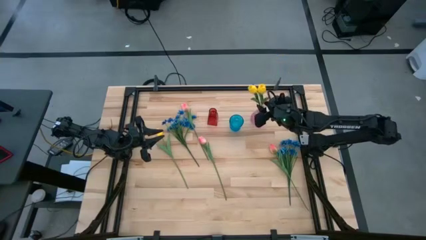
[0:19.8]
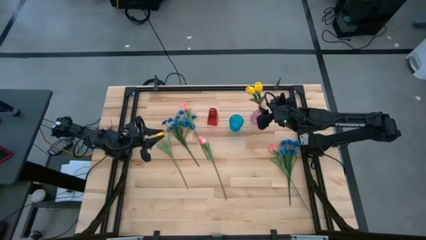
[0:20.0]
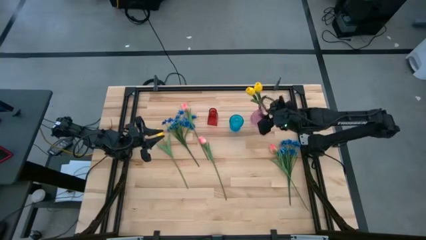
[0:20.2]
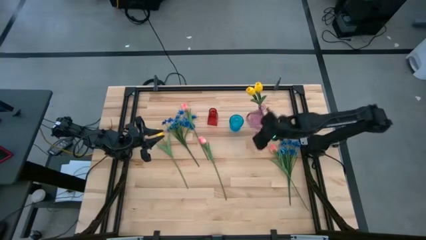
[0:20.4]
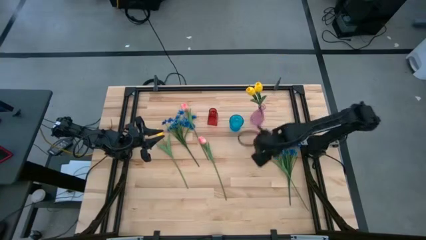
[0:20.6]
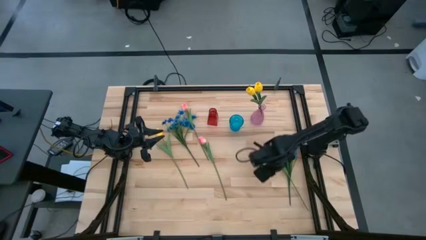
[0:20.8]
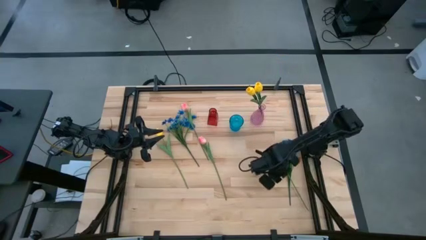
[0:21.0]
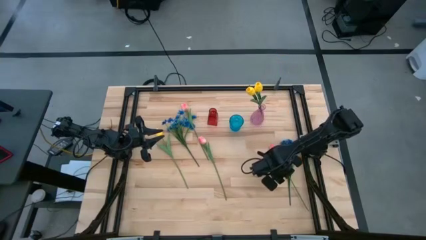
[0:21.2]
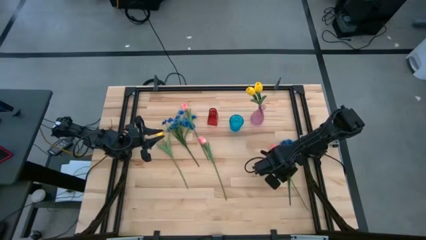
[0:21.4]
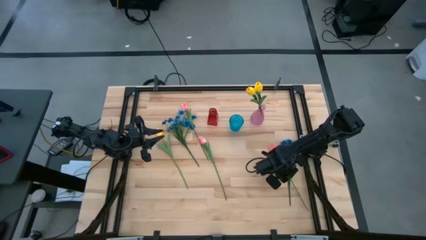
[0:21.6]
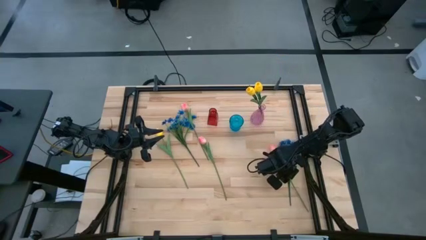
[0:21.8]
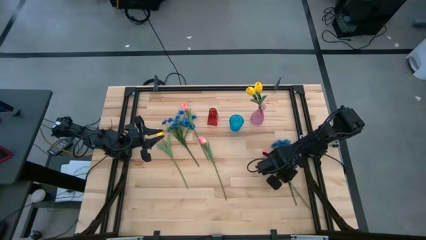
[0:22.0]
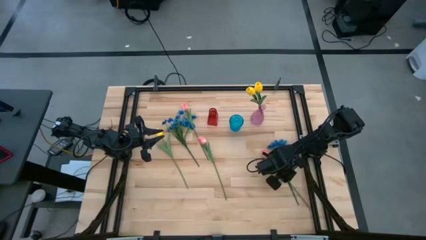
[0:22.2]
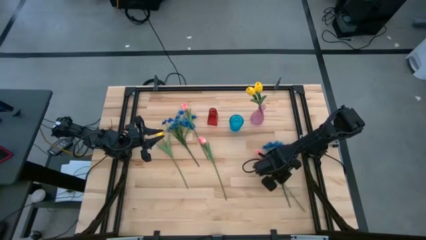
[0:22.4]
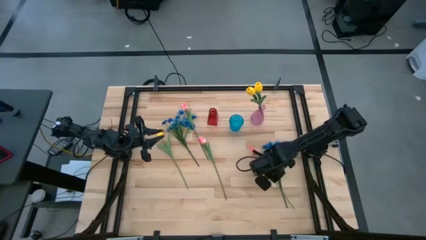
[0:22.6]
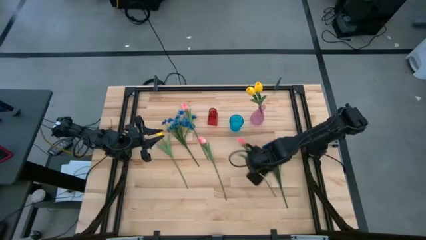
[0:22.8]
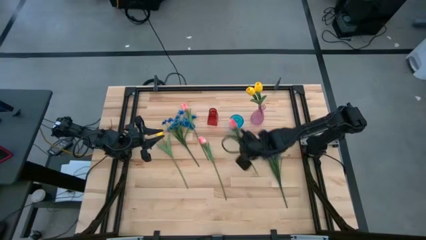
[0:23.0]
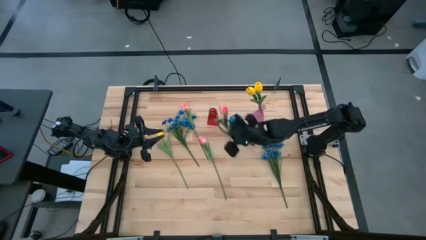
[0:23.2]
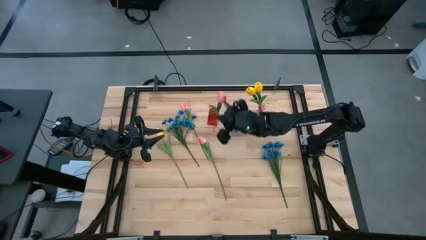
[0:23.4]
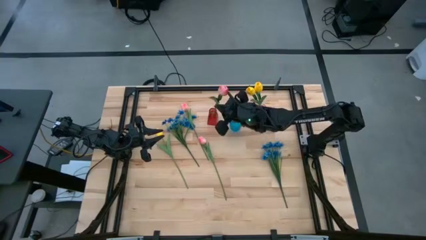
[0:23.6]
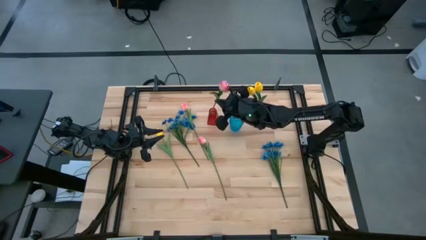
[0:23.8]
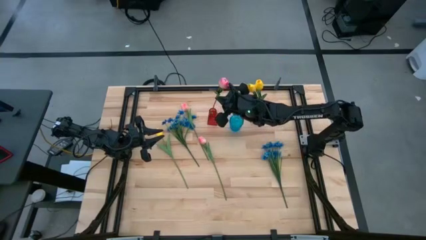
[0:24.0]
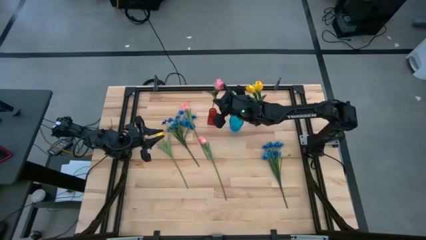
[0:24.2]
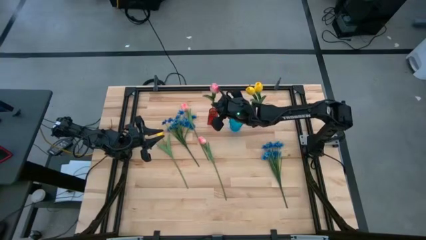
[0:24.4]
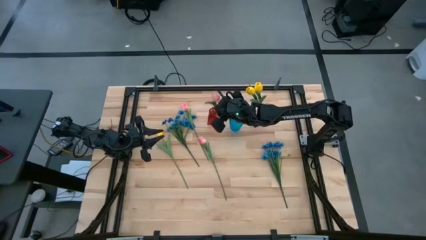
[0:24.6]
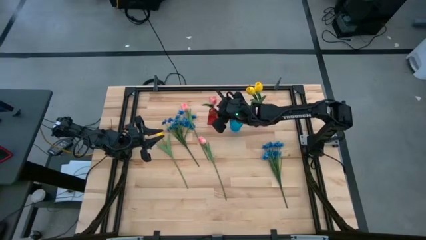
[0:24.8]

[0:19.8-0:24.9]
Task: Sort flowers into vase by color
Put the bottom right pink tulip into the red vase

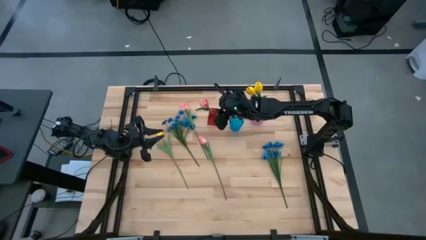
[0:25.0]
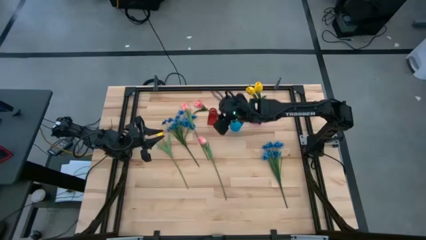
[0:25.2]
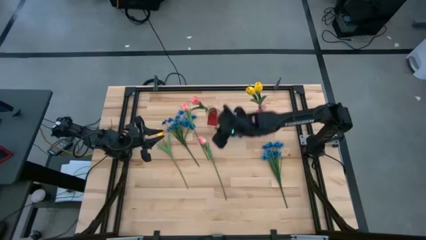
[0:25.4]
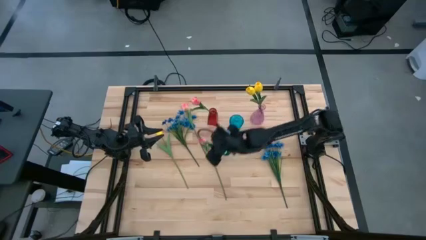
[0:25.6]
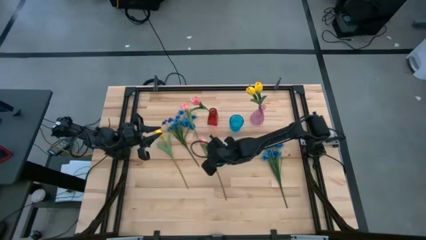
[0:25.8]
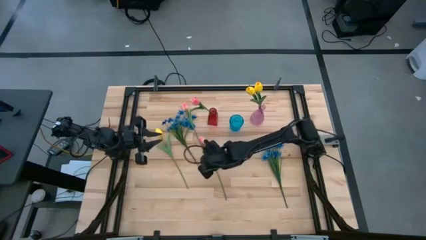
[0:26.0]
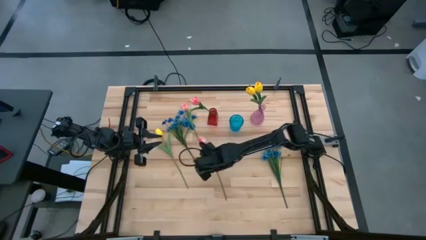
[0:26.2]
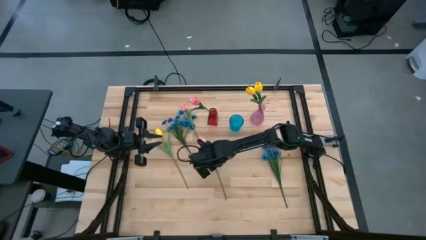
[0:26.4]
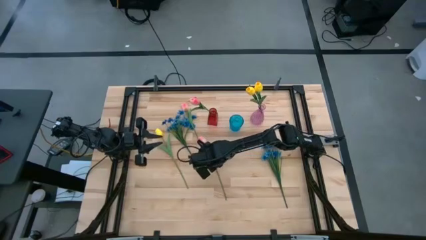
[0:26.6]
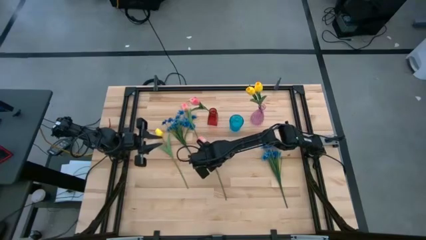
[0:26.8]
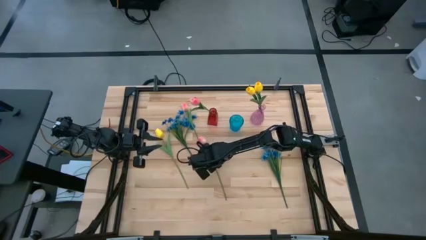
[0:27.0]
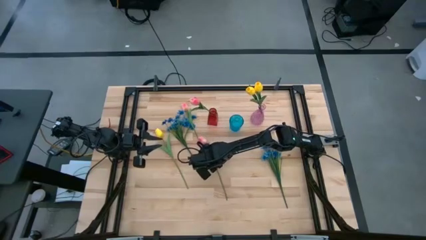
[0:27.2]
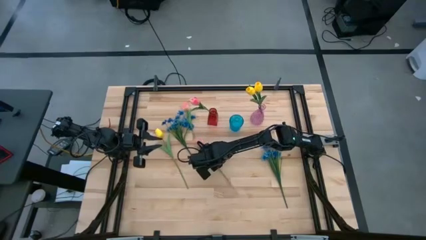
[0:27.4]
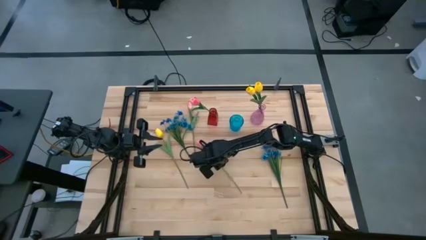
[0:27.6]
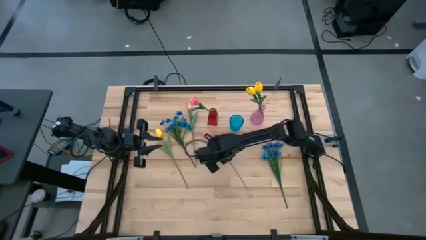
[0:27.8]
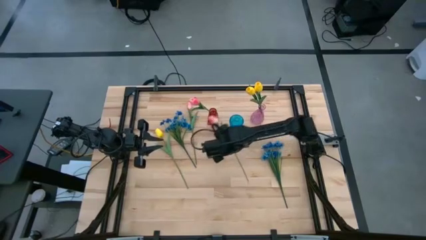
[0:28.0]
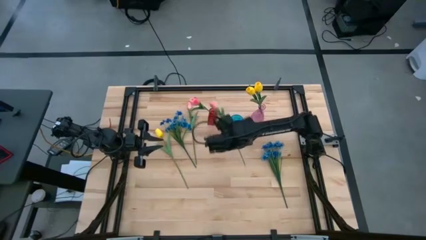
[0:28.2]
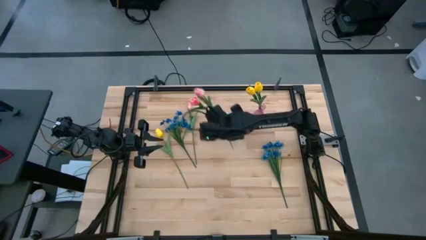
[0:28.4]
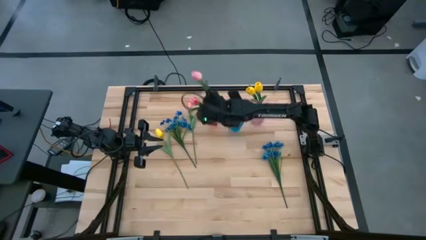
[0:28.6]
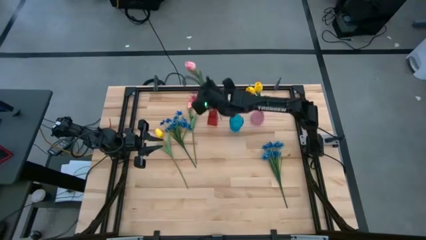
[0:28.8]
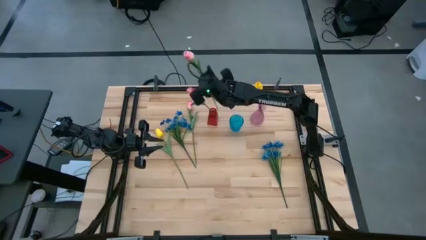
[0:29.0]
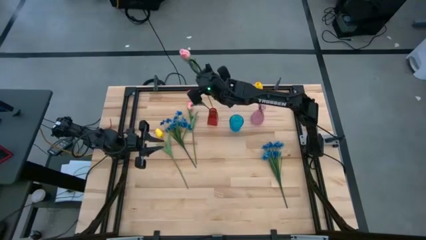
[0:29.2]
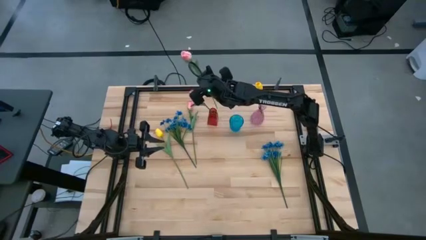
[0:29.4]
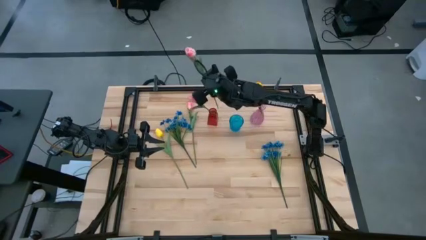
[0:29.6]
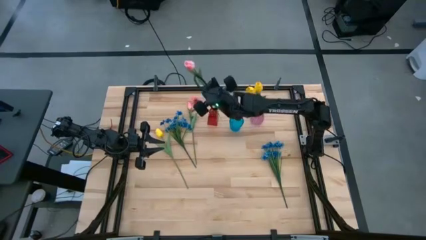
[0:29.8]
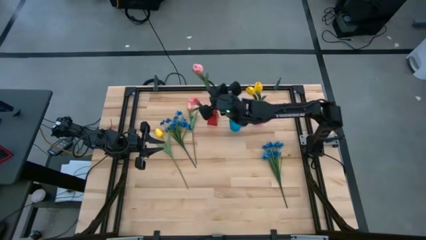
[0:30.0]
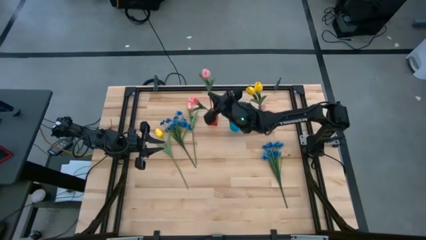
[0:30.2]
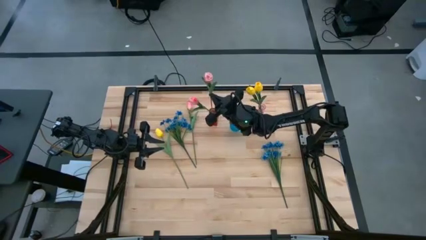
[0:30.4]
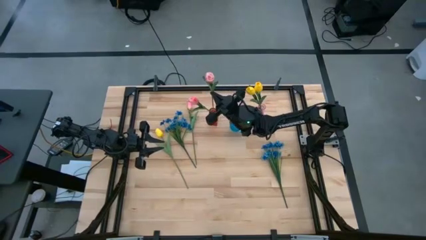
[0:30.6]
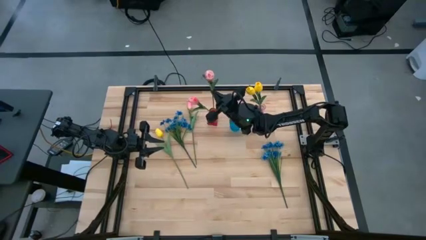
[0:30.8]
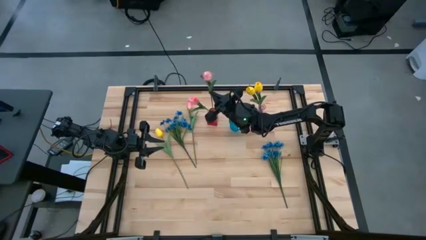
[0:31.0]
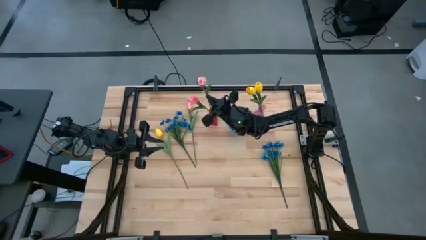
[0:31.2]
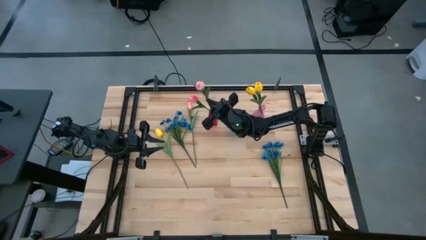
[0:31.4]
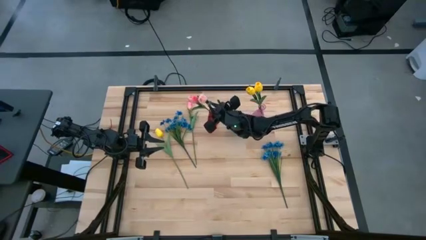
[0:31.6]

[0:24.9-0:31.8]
Put the bottom pink tulip into the red vase

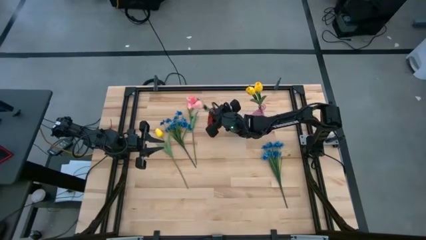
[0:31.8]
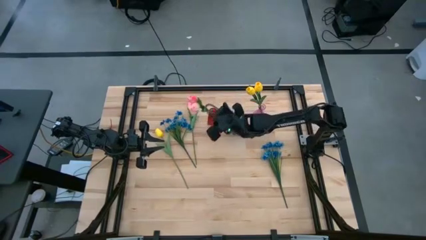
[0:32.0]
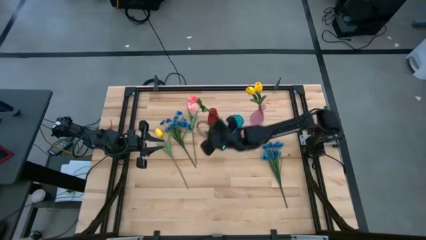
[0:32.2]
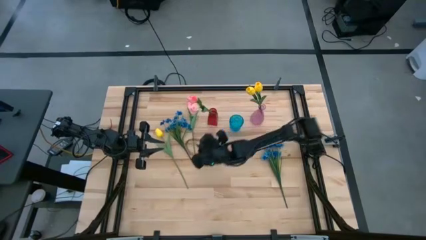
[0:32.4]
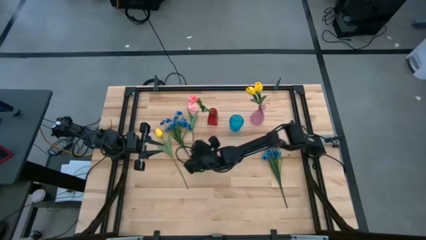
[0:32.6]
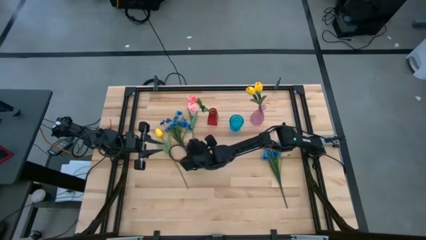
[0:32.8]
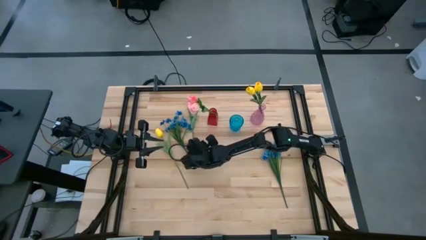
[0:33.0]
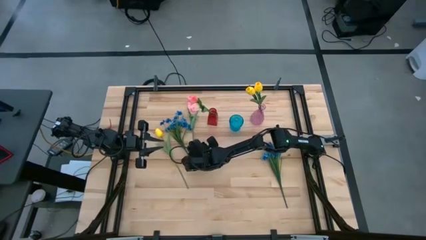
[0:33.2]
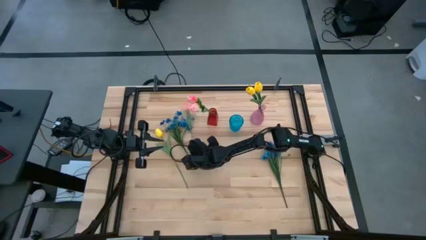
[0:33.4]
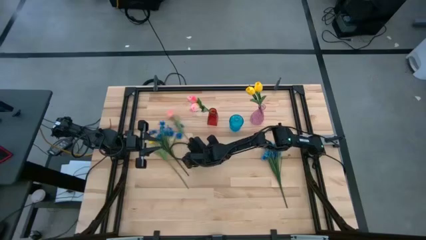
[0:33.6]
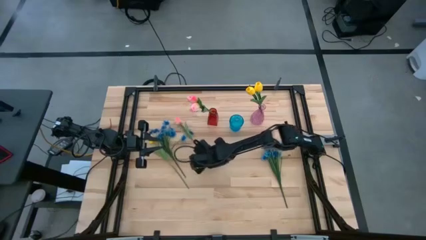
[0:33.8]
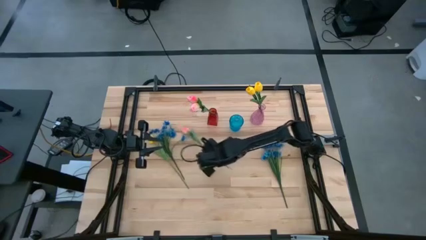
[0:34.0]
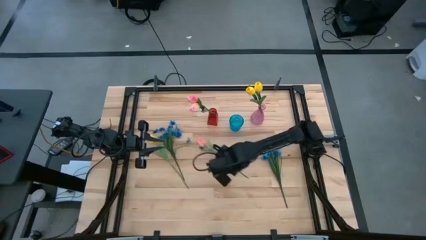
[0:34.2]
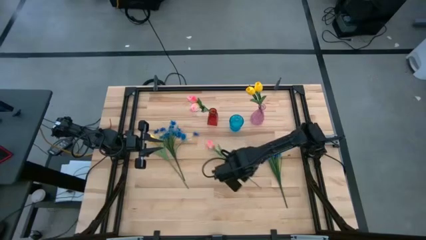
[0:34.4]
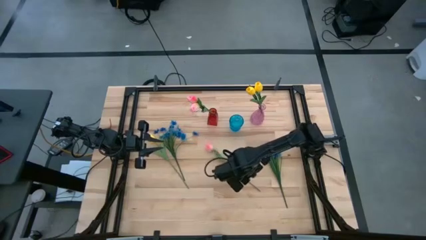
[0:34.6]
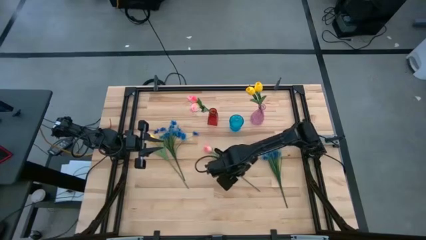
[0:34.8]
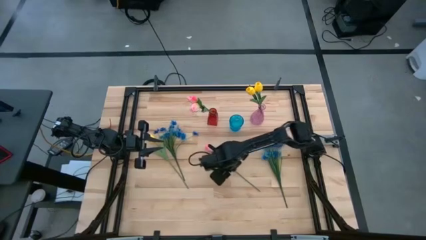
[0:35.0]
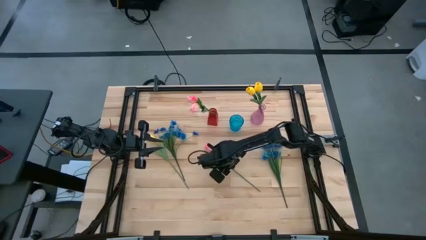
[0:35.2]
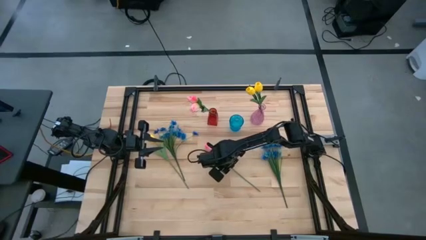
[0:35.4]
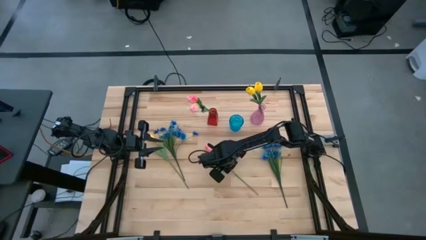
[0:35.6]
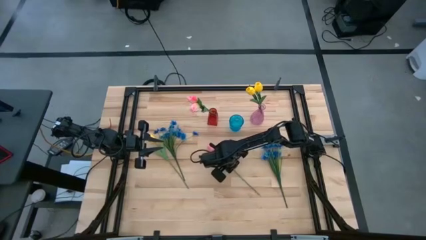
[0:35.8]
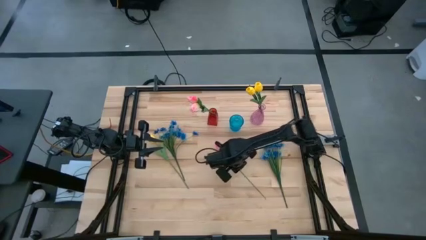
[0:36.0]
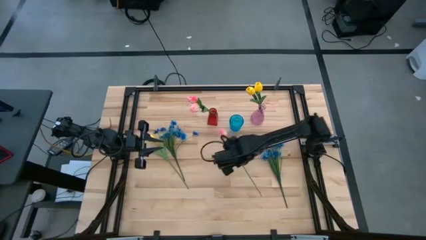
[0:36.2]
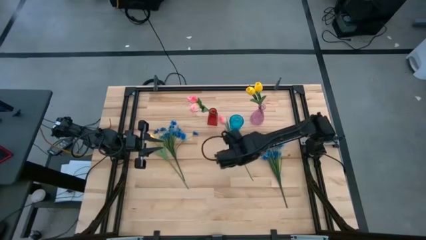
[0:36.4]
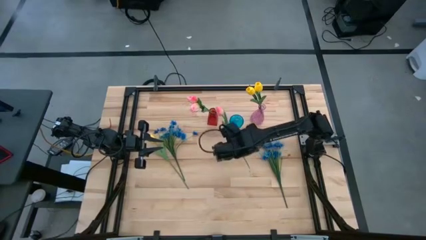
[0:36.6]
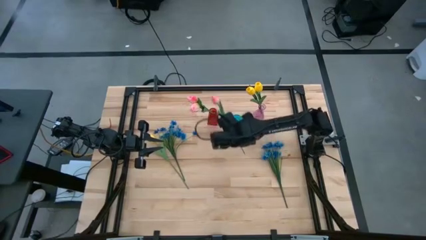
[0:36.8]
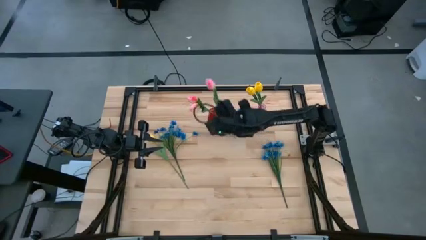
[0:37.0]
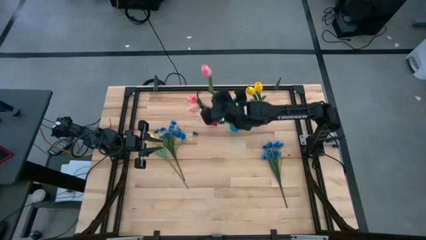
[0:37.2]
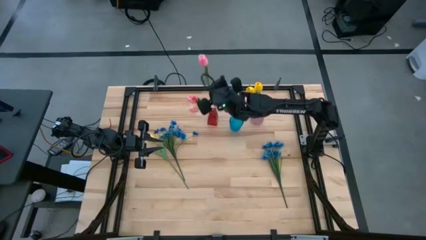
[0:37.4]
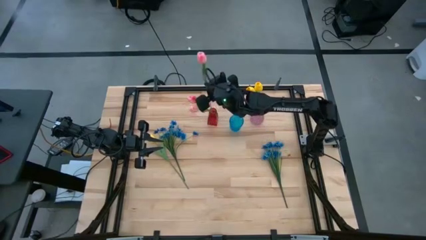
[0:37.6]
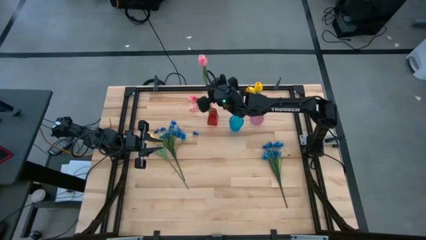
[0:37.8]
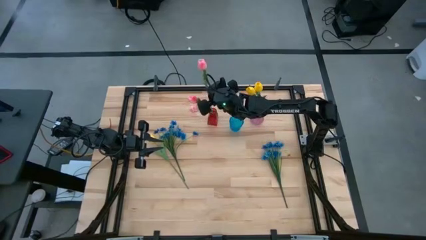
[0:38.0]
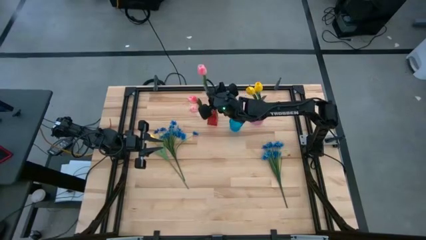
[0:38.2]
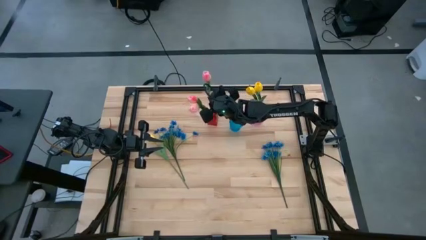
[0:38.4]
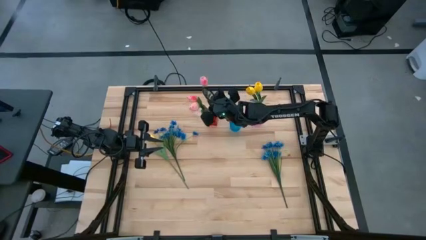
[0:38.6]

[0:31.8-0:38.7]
Put the pink tulip into the red vase
